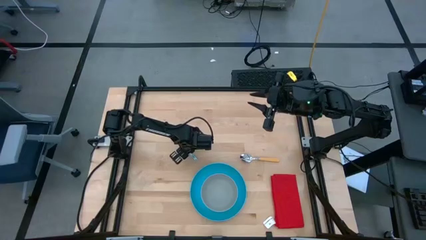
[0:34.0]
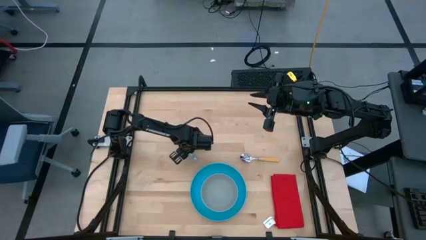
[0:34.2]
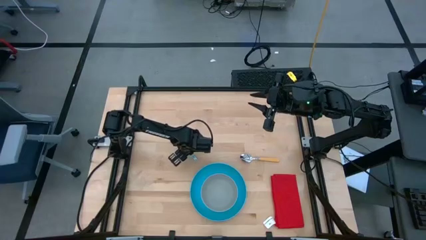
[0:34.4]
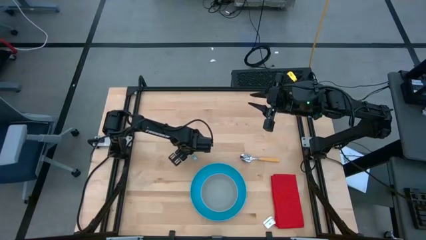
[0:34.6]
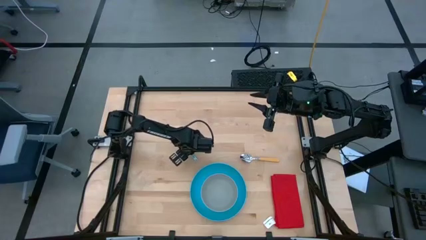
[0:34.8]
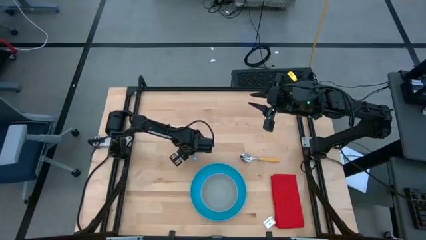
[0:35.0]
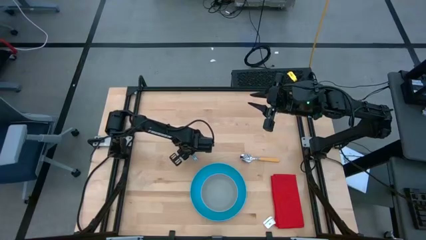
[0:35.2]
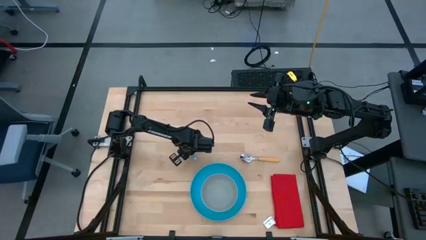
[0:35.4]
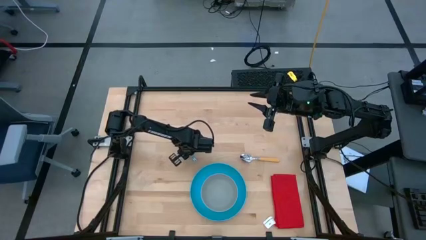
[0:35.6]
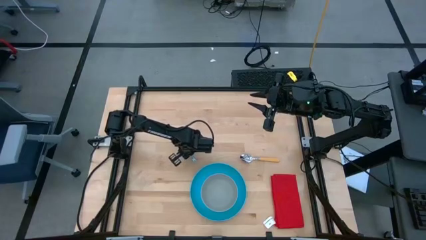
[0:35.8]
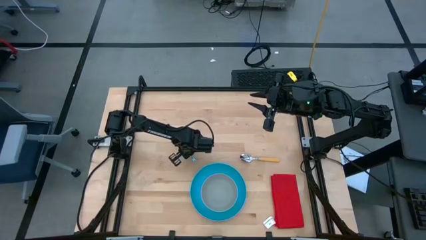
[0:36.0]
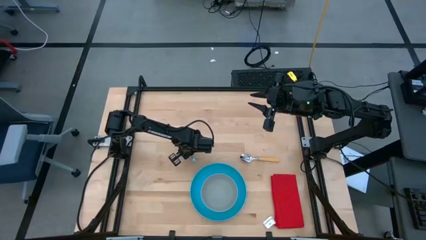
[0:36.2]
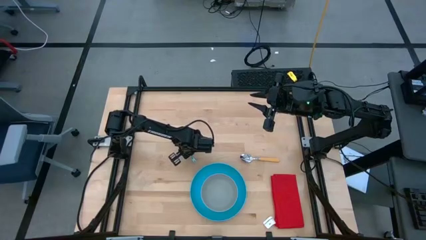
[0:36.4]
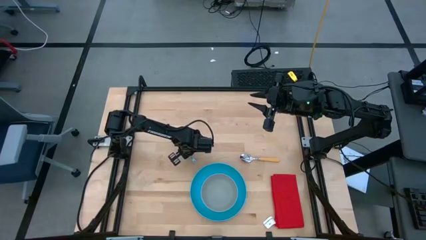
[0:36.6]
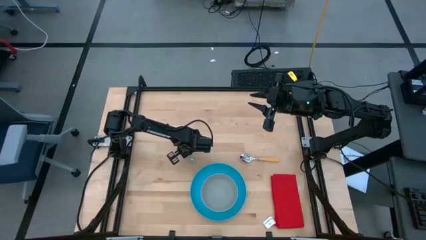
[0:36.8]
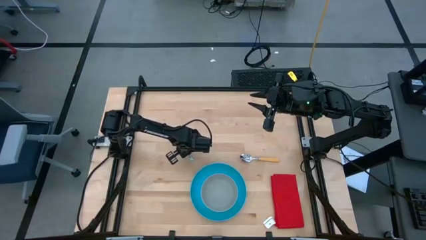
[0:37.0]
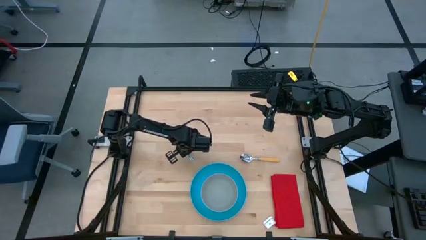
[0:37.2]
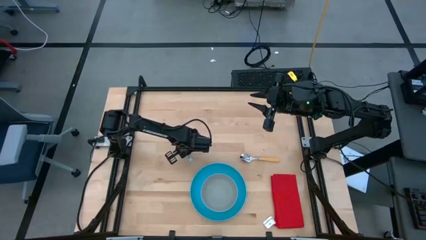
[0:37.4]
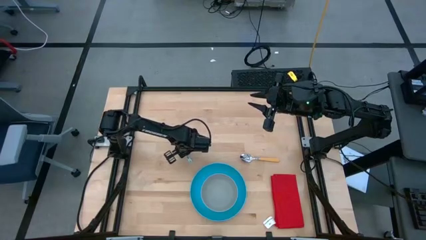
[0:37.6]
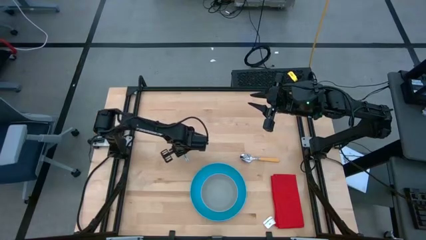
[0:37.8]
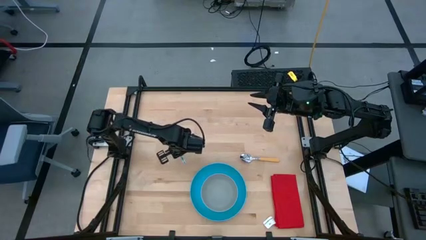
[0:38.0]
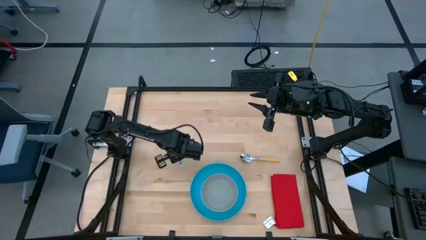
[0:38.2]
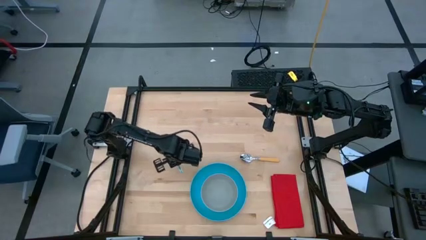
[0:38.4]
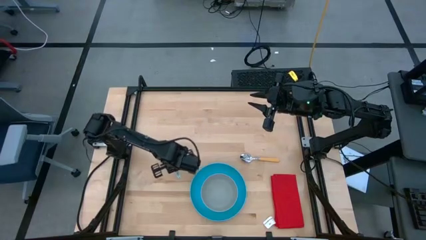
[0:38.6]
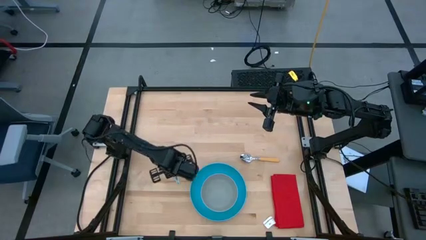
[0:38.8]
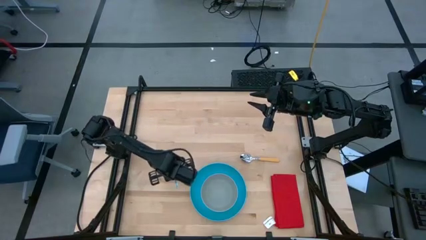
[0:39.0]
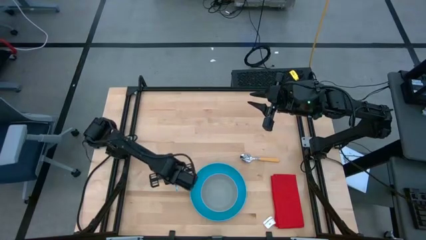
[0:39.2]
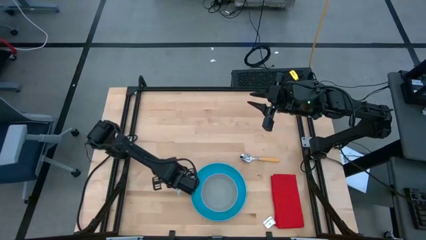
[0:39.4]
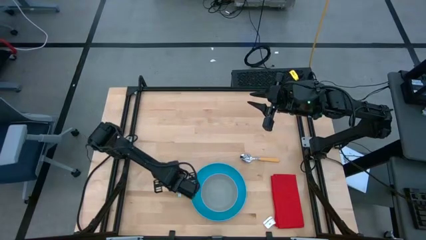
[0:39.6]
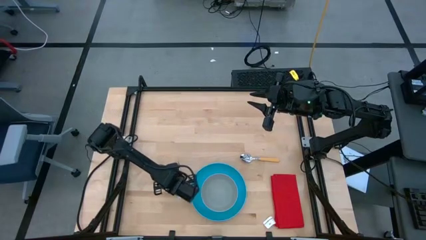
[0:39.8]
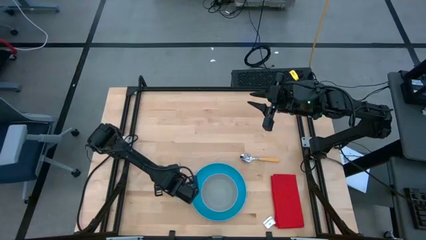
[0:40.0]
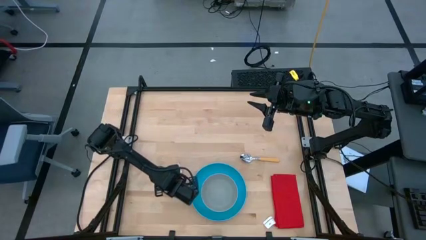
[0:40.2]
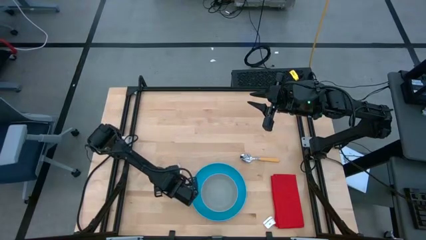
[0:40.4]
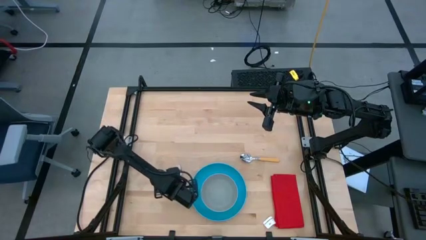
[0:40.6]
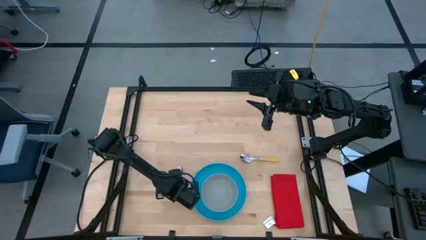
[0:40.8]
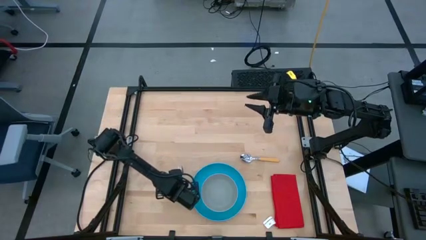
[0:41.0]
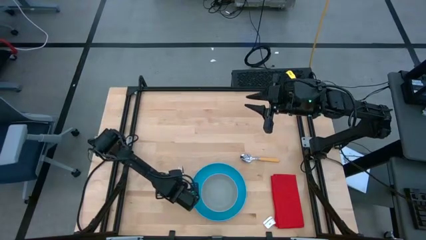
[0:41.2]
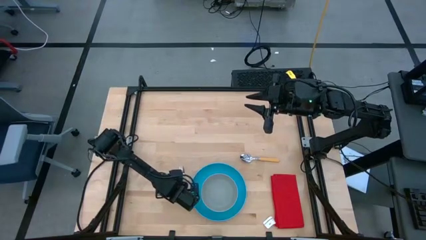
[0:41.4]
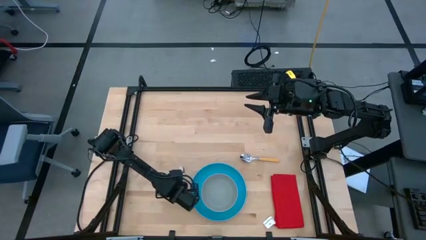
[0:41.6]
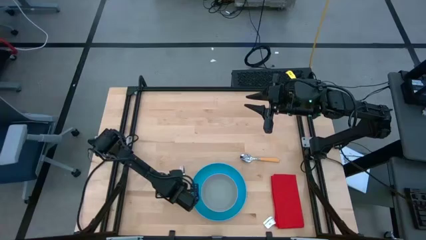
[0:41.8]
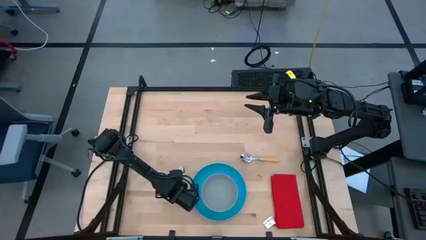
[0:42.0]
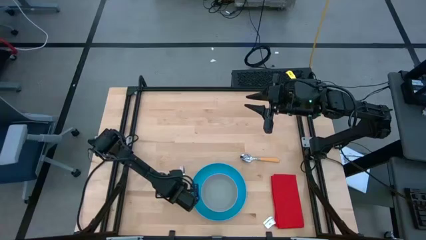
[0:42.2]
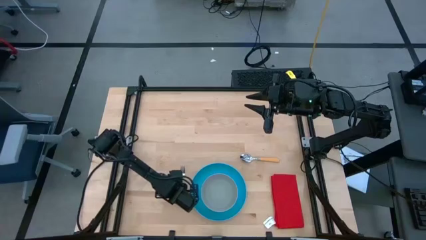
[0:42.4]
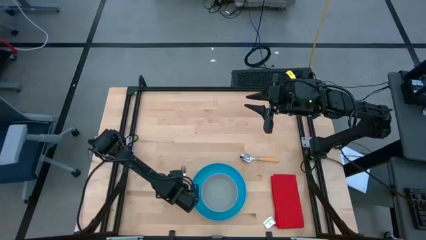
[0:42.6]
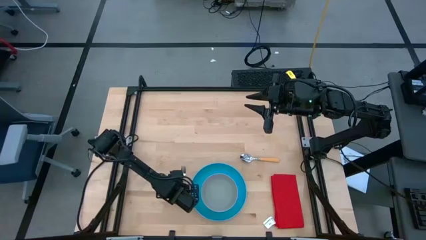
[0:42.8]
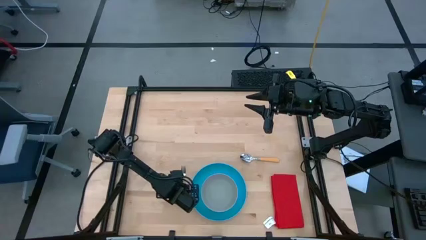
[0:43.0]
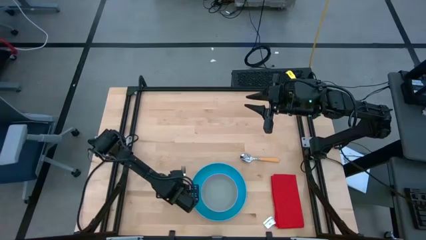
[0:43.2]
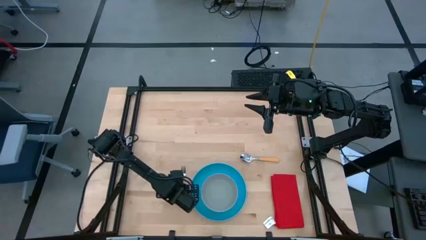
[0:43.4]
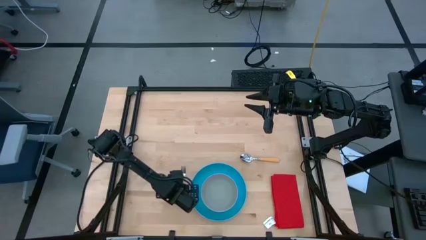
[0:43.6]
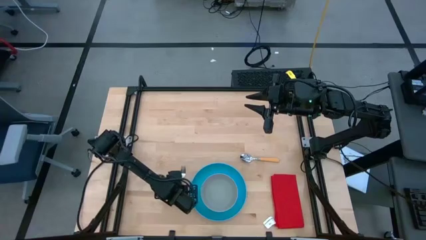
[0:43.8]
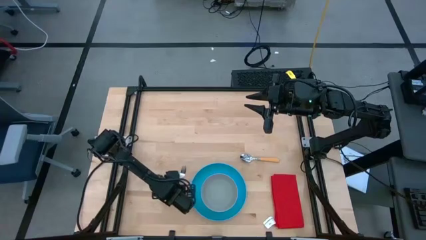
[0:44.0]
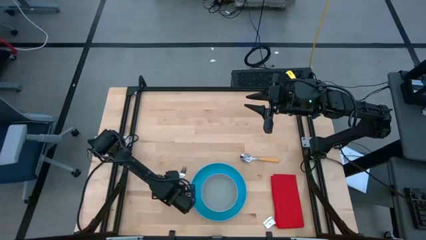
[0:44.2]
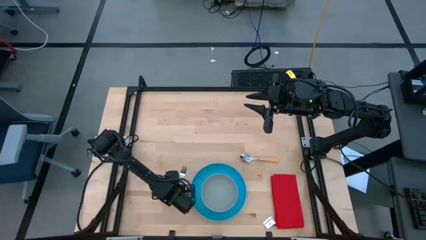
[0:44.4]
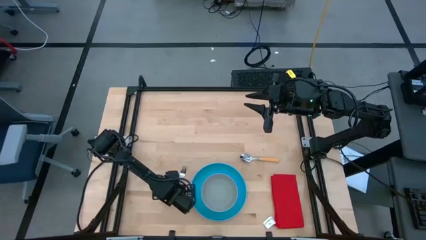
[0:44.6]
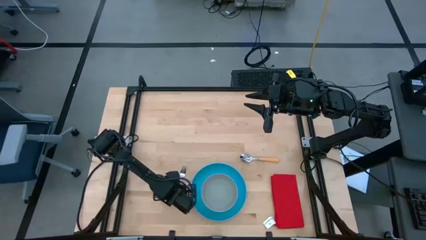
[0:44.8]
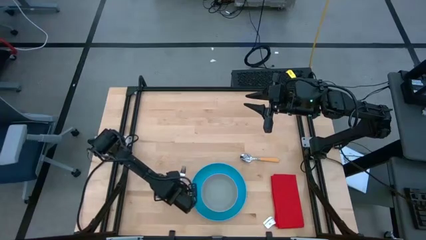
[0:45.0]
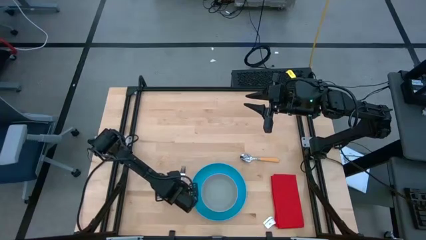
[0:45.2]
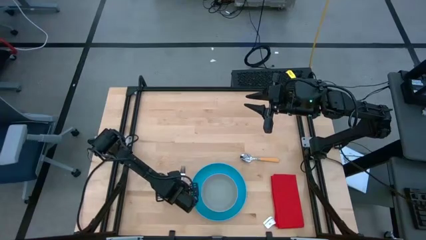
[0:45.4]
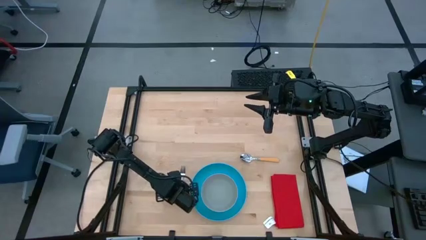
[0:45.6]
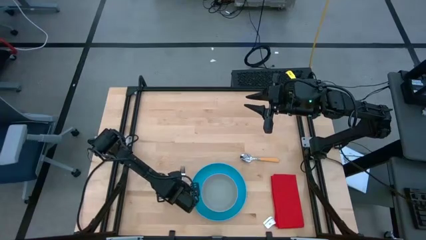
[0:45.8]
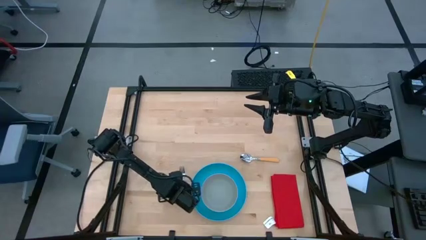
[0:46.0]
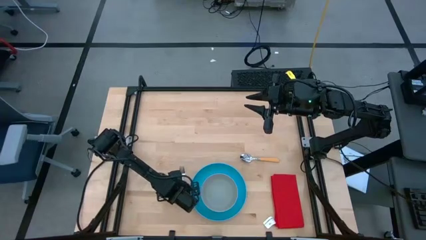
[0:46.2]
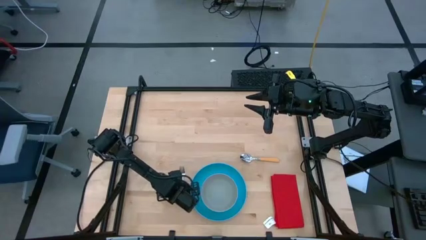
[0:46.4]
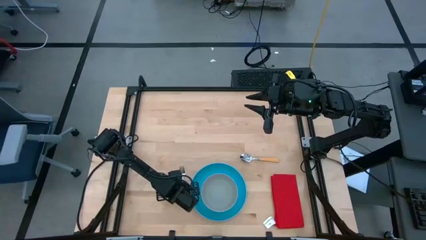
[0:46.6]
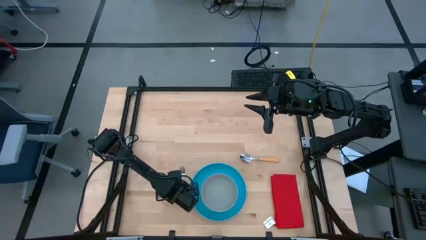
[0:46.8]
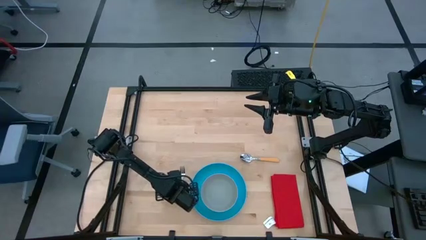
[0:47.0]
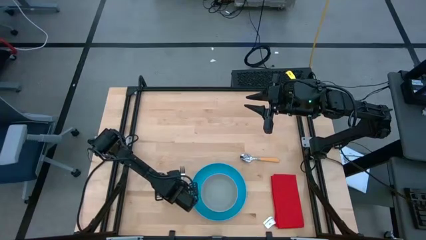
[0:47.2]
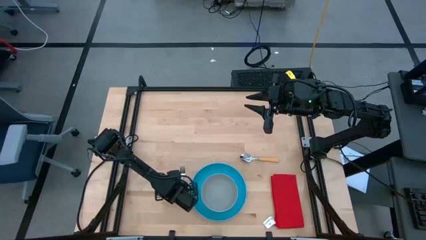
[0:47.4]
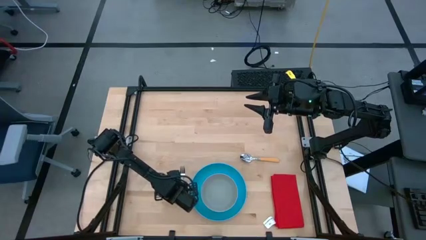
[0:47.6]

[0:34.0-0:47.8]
Task: Pick and place plate/cup/fork/spoon on tray
Put the blue fork beside the blue plate

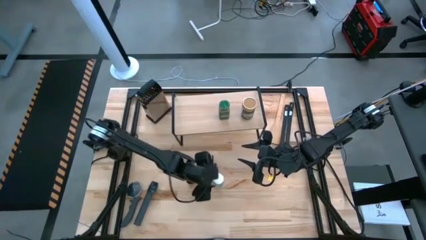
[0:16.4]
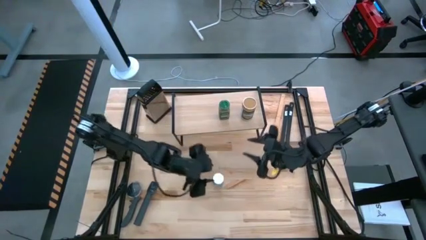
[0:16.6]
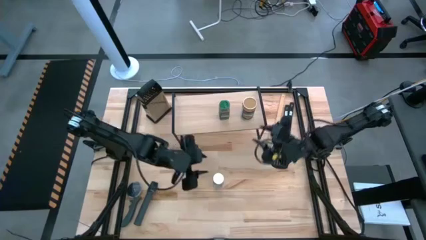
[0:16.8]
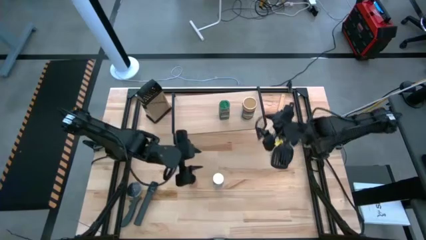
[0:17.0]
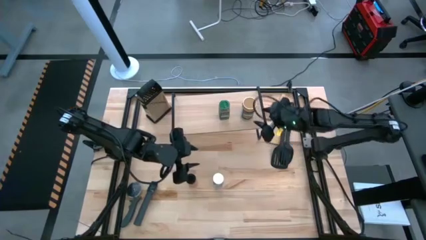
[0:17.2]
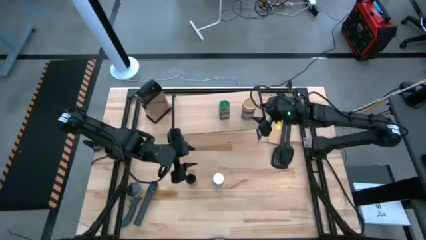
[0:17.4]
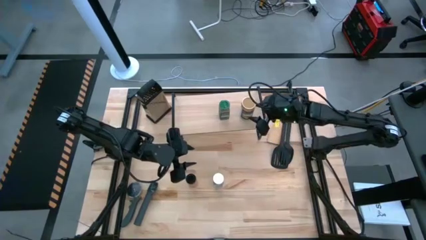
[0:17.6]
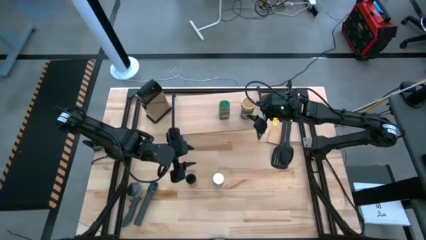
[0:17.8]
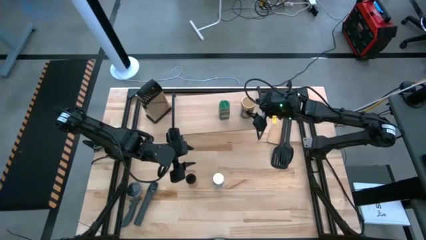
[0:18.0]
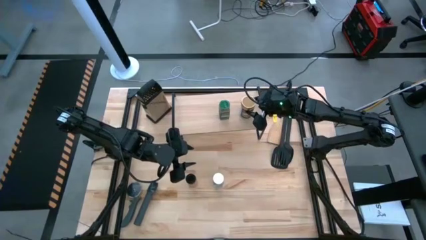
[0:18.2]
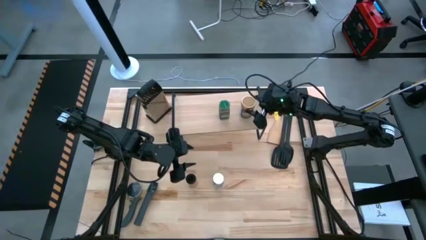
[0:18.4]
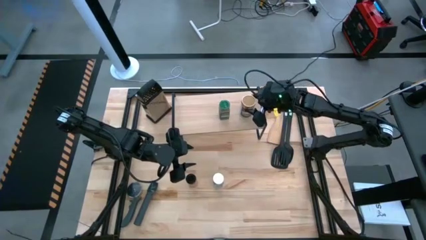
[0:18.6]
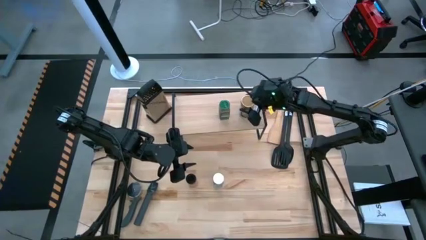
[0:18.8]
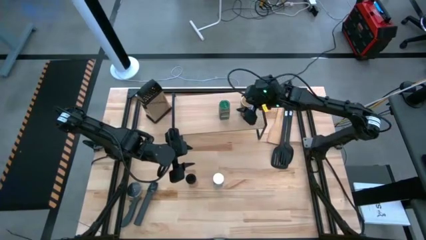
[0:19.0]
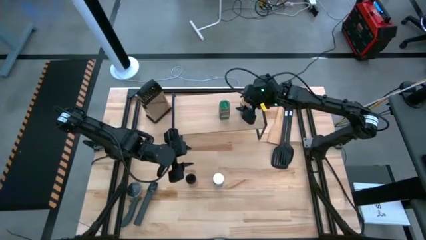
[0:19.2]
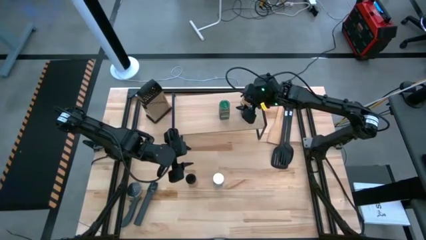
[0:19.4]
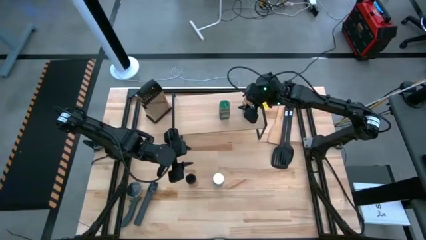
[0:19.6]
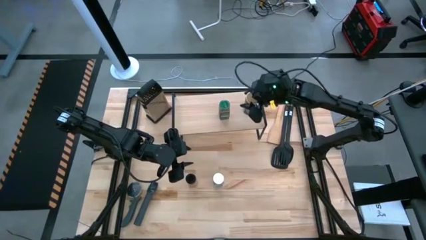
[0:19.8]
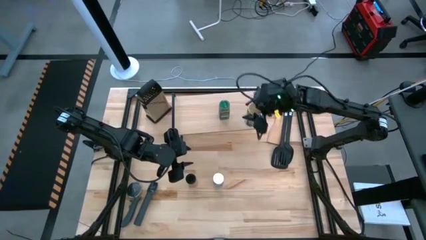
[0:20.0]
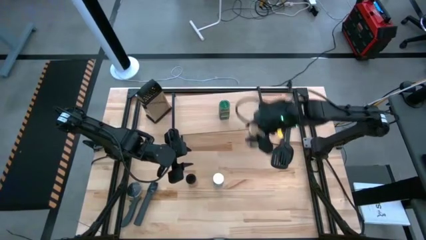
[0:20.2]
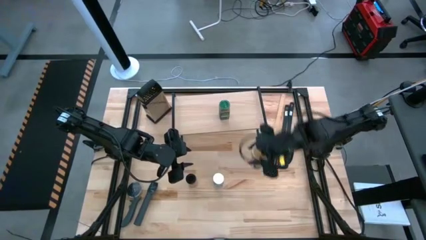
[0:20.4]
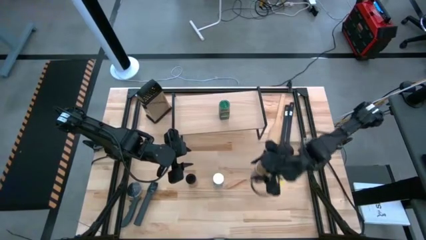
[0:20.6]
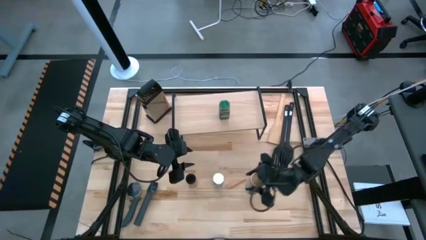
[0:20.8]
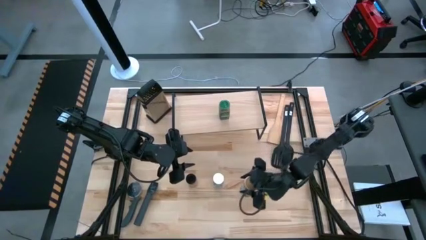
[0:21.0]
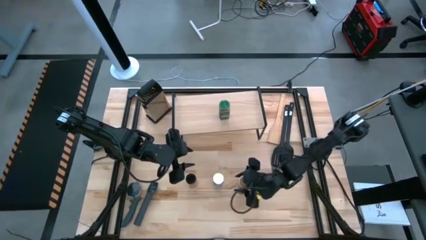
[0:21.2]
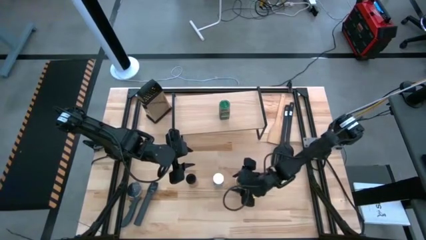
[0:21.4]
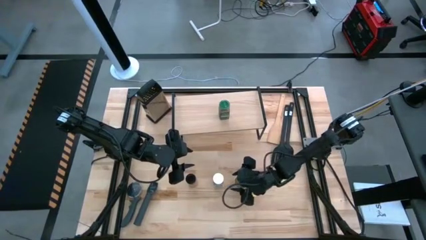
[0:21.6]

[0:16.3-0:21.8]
Task: Shelf spices
Remove the golden seasoning bottle from the shelf
